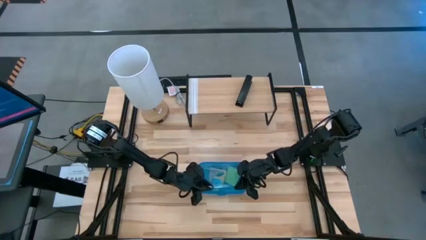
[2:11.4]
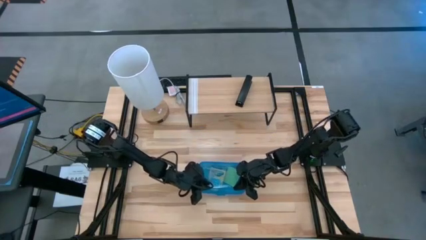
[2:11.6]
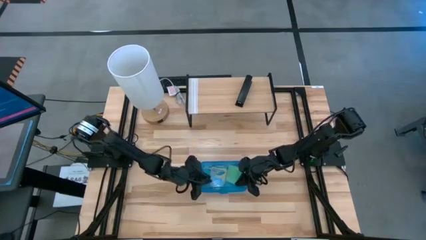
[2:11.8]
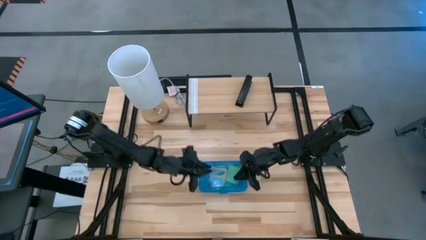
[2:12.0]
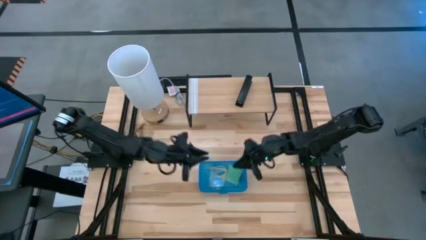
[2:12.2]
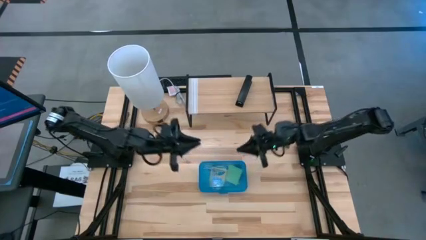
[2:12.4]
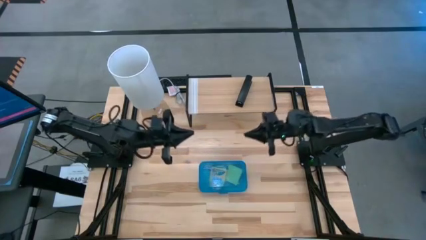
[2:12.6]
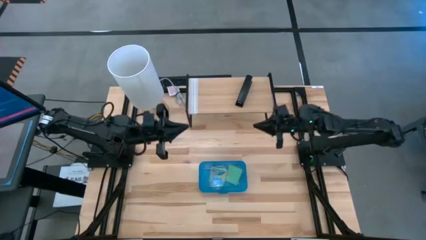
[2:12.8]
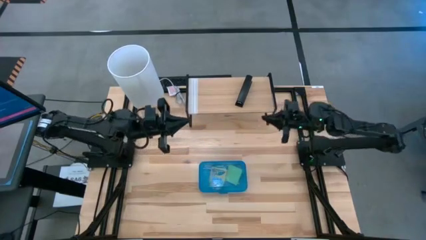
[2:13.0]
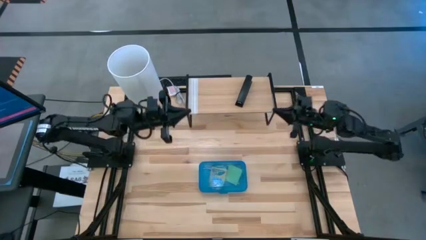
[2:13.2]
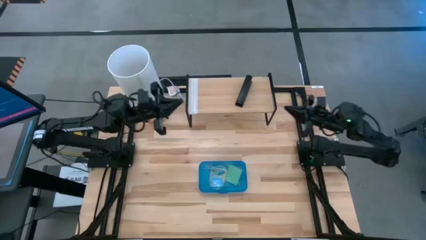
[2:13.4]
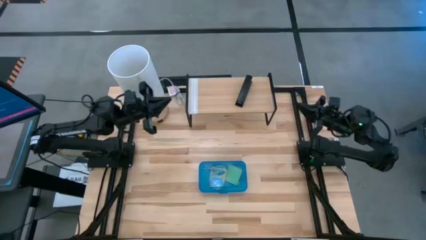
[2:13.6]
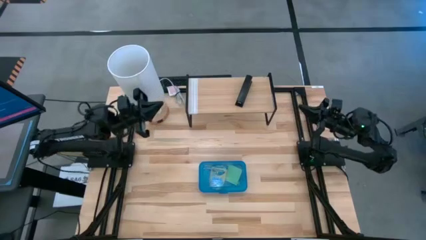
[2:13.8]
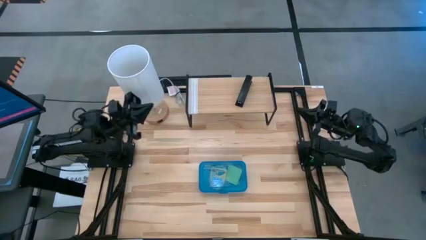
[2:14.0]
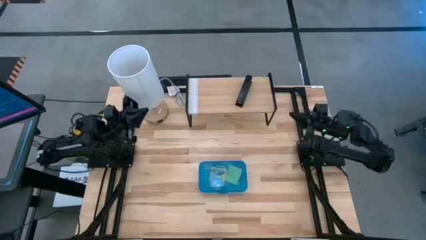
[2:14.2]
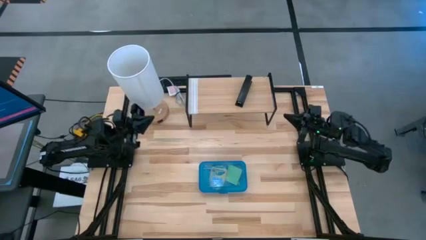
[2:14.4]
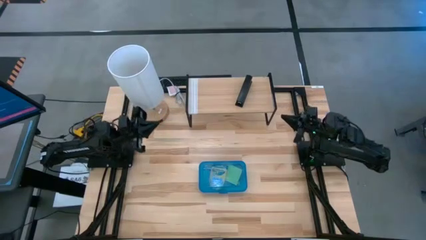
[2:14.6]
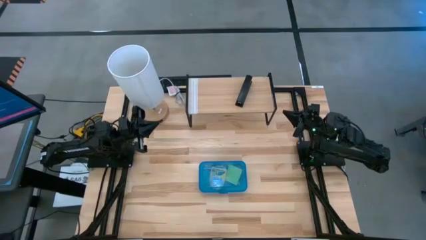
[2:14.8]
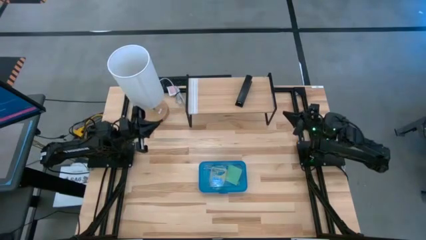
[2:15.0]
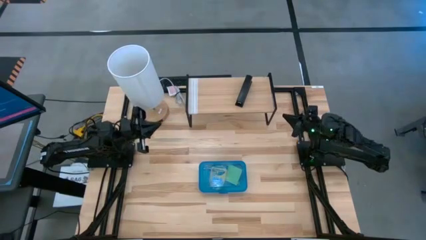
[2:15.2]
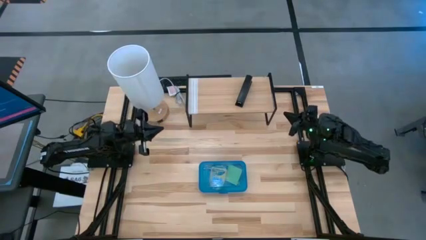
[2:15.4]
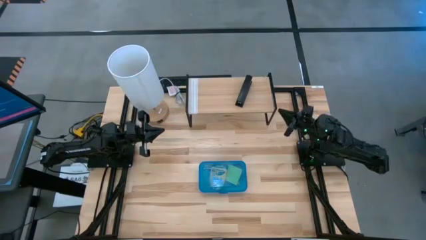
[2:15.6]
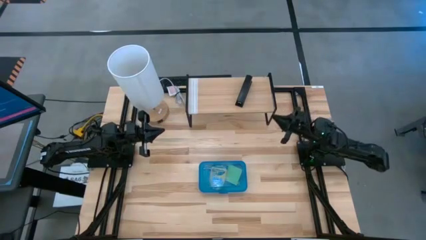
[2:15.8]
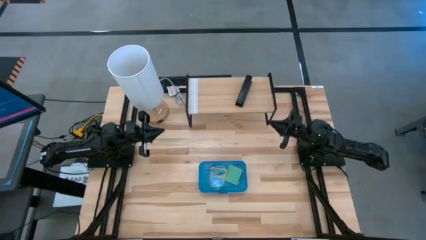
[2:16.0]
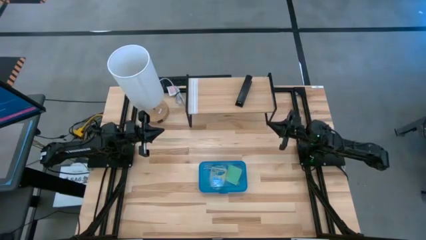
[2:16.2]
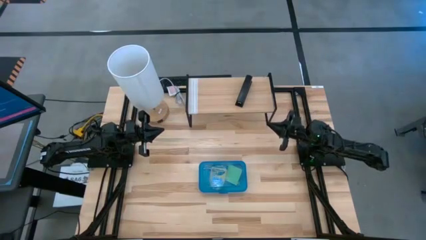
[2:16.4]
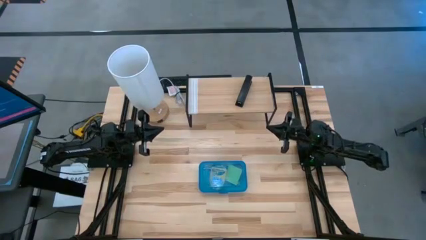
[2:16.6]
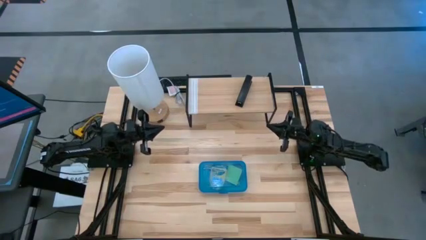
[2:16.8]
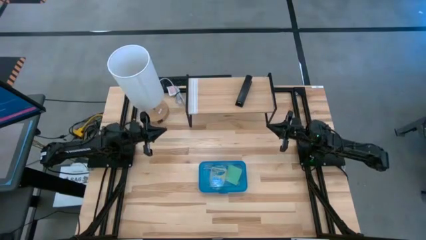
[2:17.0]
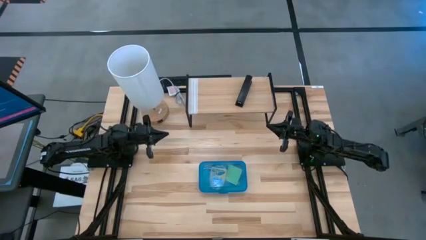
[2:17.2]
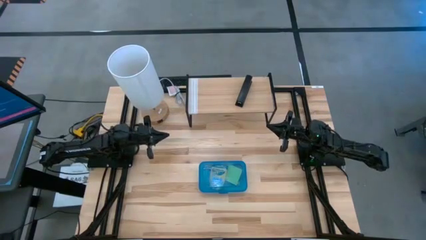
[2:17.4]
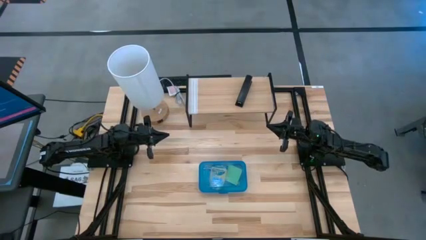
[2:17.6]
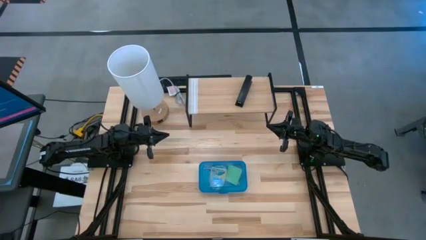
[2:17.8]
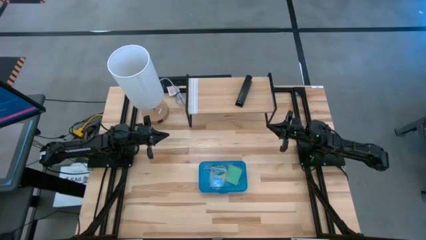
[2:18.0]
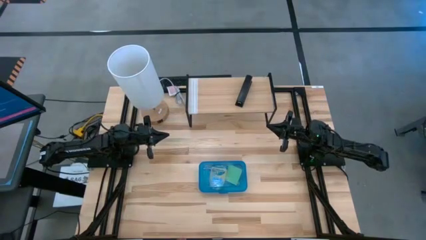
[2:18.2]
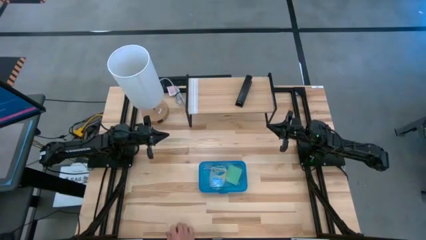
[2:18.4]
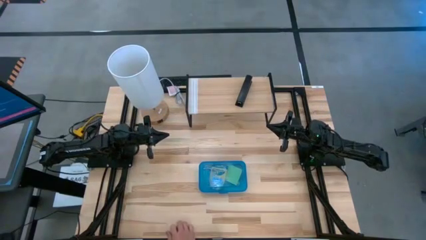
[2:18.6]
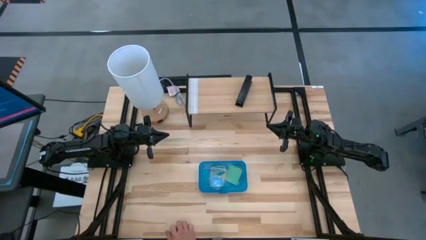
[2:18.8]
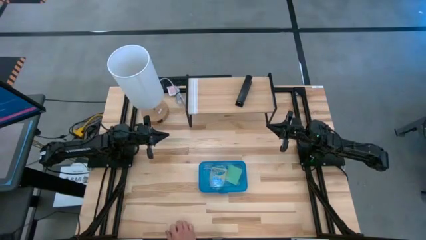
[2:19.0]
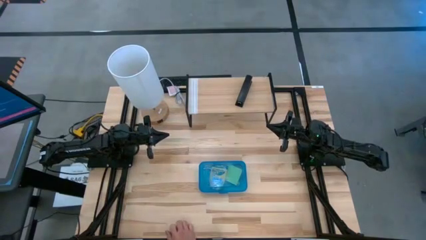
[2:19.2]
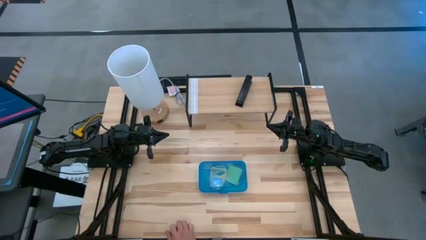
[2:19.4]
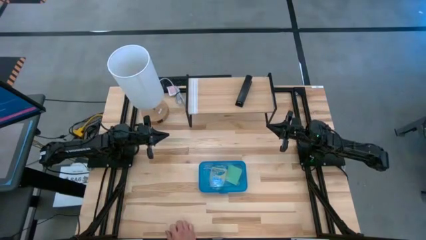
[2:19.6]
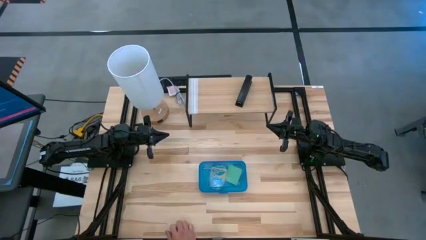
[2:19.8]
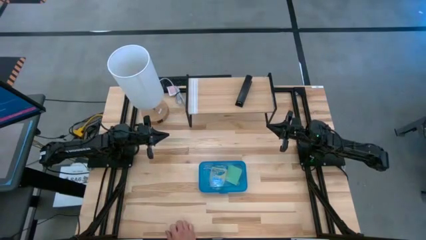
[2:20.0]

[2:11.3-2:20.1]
Task: Pack school essentials
Return to Home Position

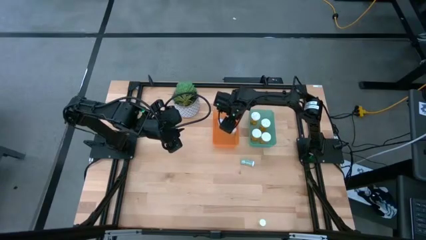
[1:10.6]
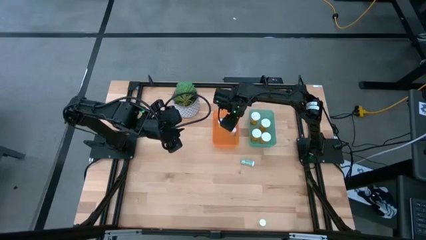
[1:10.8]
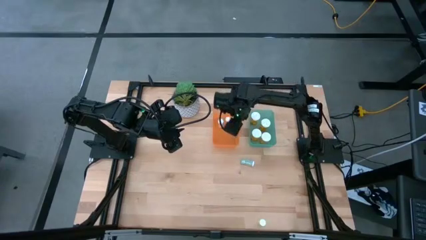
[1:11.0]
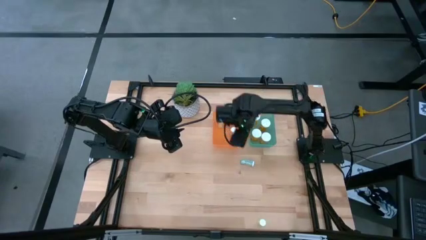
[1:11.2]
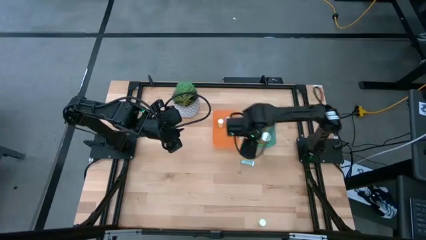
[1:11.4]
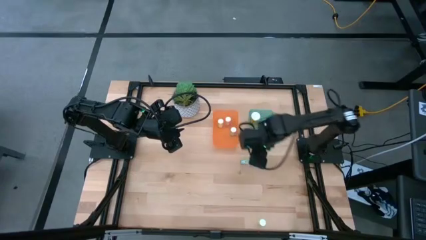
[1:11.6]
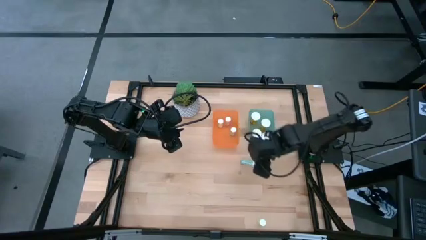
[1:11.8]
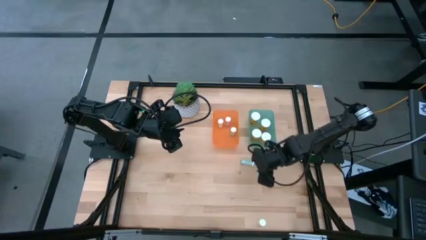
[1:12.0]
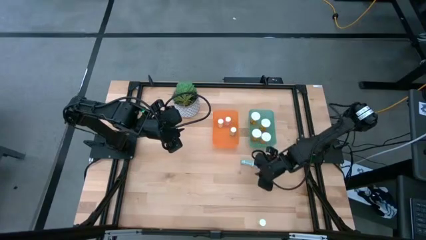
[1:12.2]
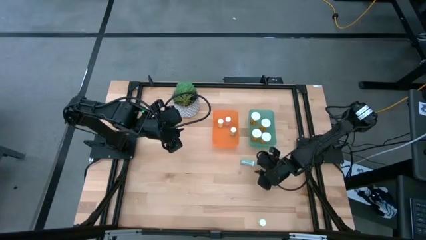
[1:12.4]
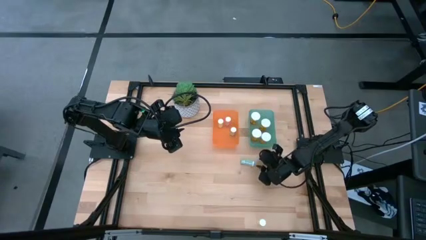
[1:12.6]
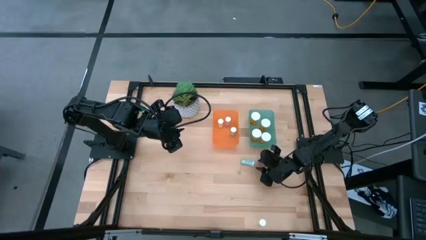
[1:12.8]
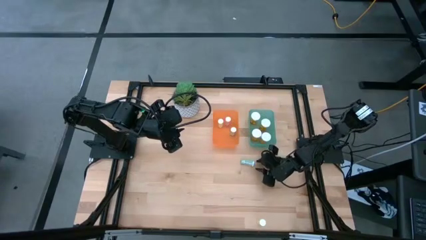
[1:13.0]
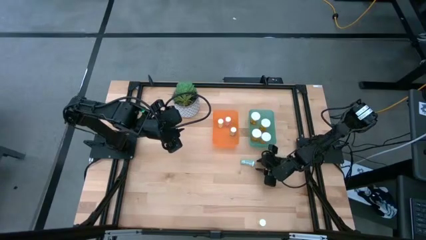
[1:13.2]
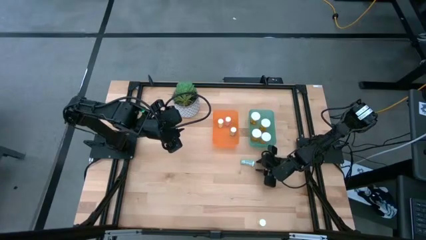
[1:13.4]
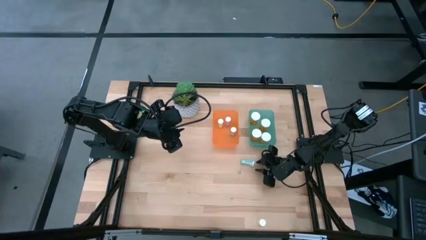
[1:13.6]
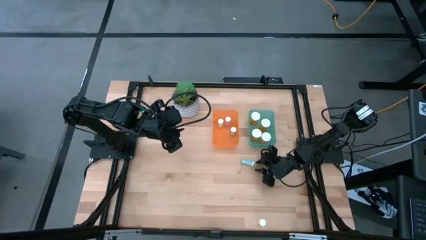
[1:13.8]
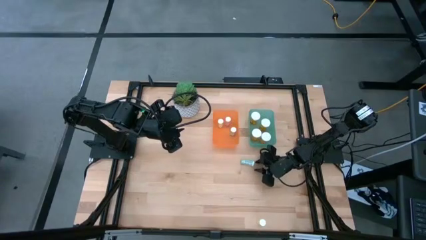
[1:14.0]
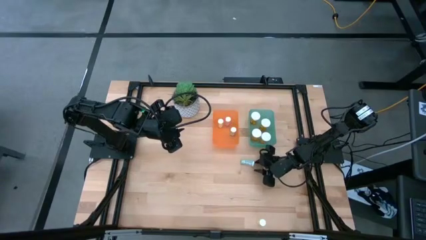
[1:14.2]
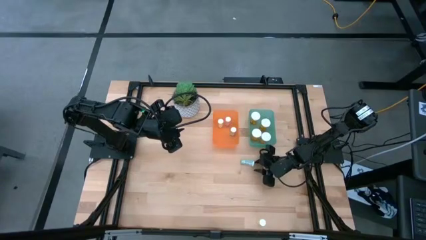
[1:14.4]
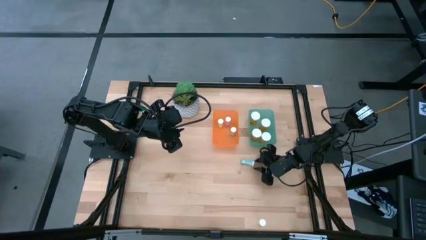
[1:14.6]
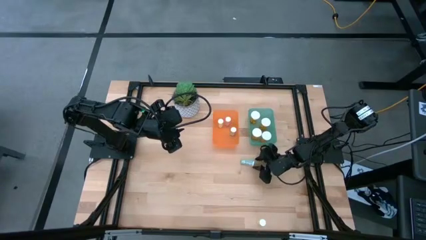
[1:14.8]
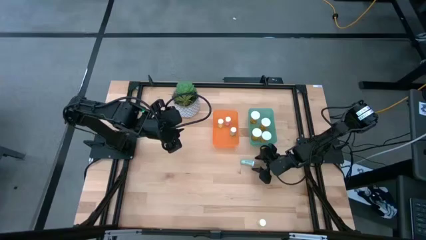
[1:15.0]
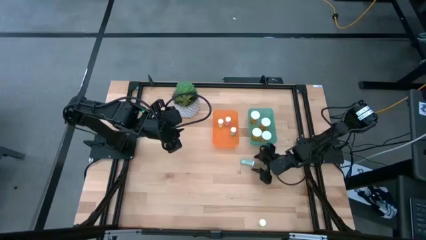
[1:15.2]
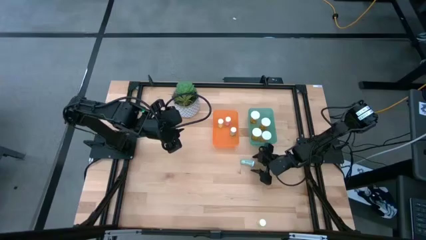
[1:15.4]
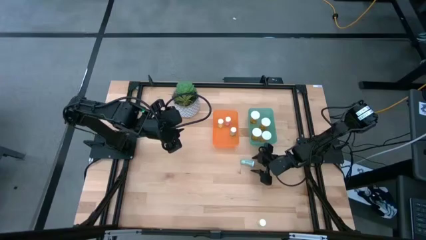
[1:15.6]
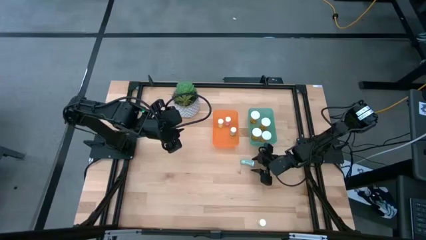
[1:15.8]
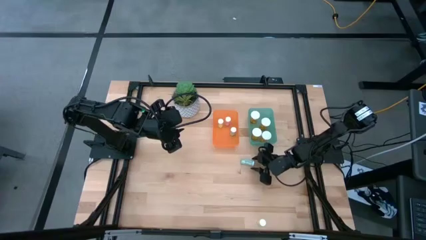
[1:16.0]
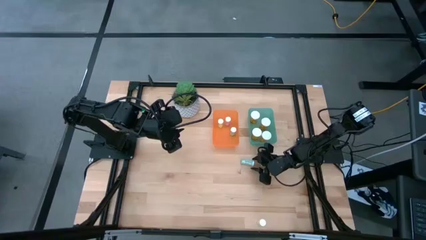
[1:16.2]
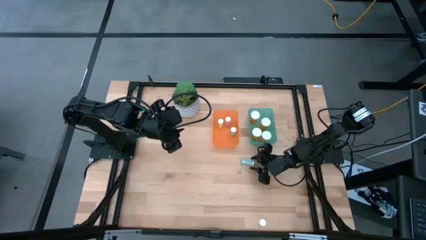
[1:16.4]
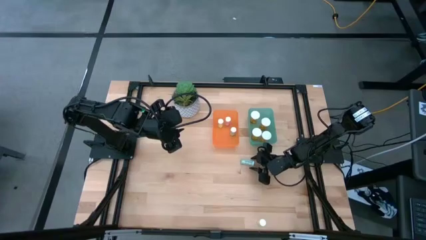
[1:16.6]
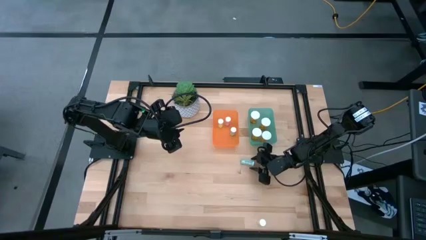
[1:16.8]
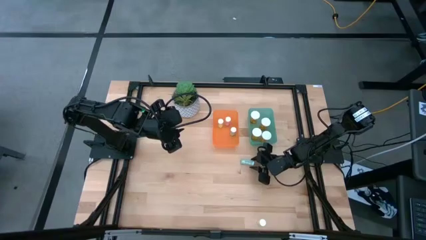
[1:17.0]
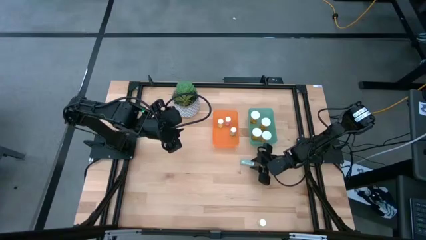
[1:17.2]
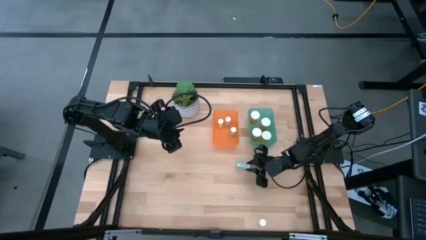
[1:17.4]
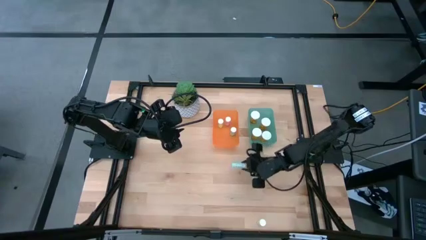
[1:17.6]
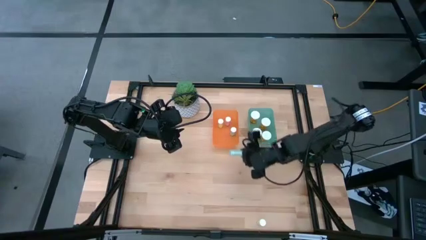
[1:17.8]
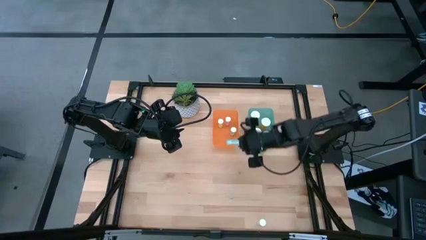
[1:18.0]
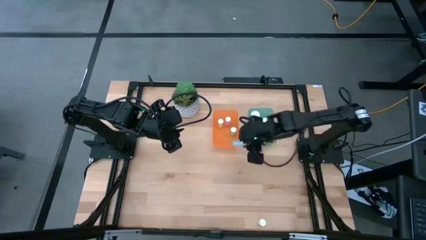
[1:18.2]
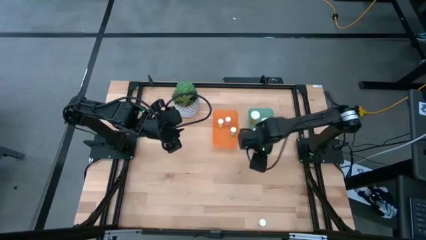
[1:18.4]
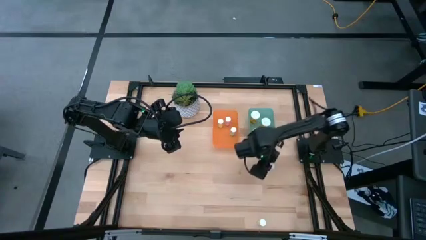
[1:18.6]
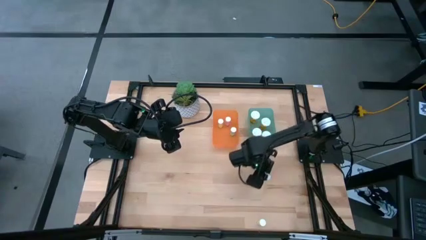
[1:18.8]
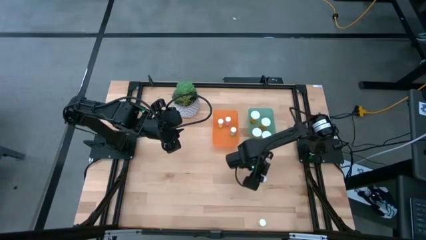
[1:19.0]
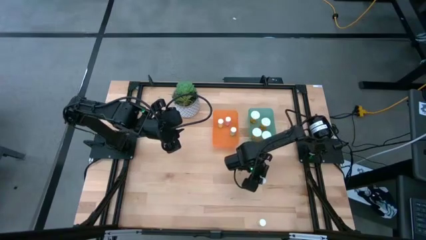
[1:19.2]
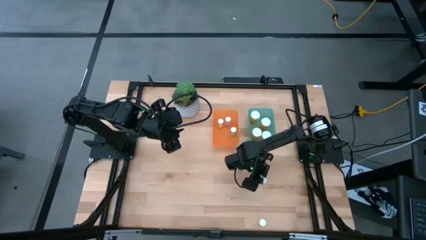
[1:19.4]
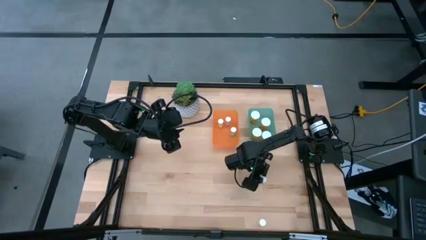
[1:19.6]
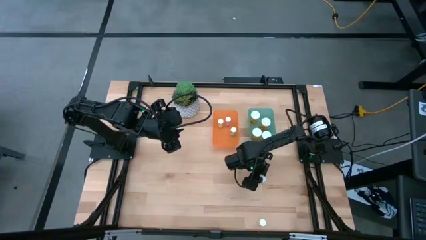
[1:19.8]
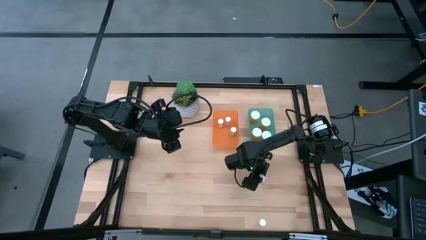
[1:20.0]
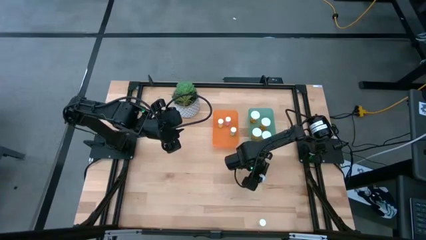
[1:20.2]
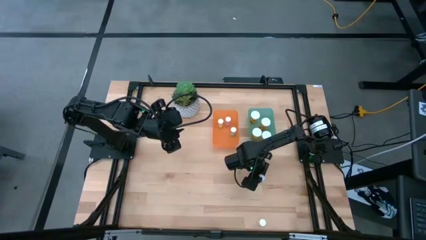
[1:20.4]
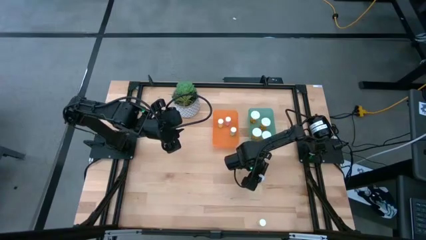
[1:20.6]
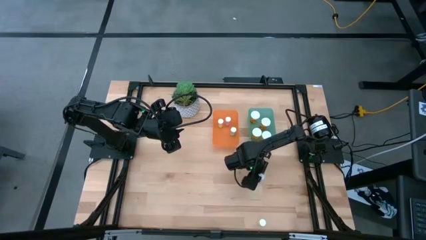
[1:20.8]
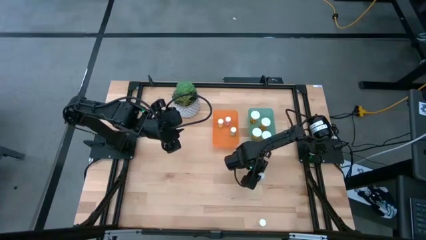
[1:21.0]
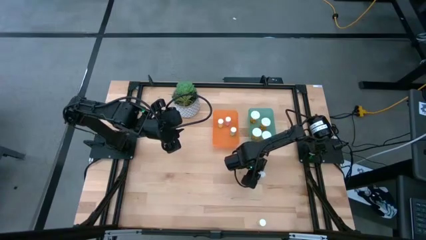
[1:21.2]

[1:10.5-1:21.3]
Task: Pick and place medicine bottles into bin by pill shape (circle, oval)
Adjust the small blue bottle
